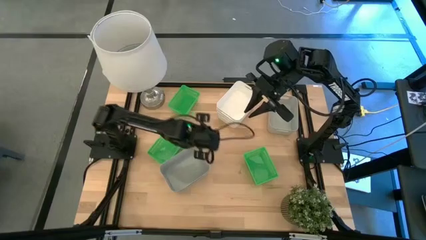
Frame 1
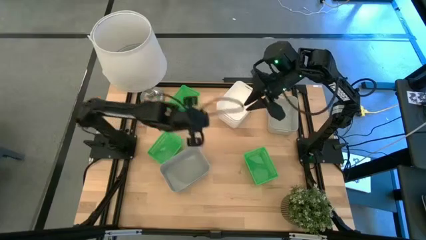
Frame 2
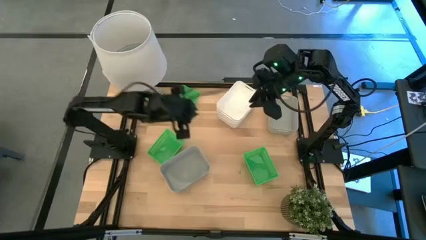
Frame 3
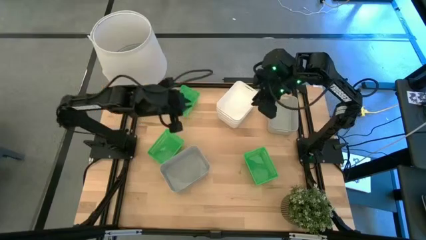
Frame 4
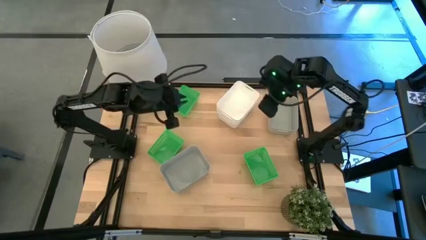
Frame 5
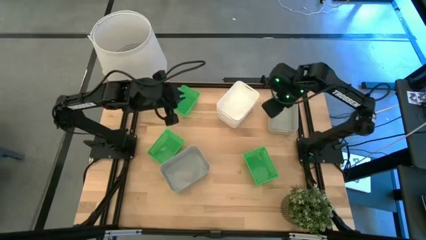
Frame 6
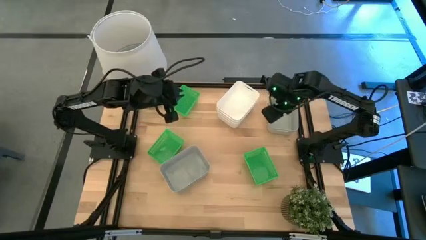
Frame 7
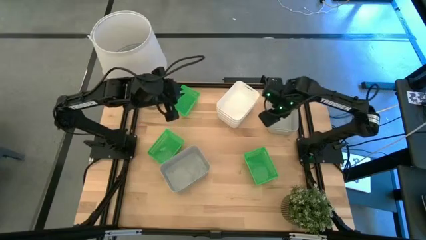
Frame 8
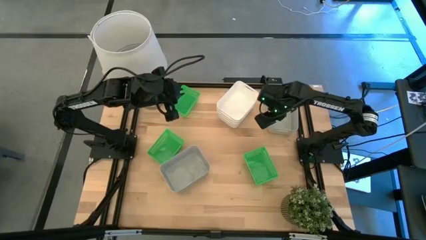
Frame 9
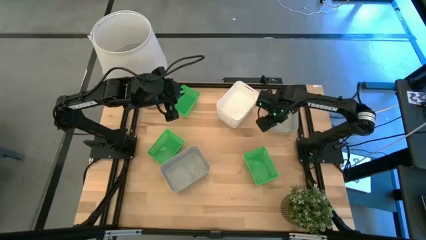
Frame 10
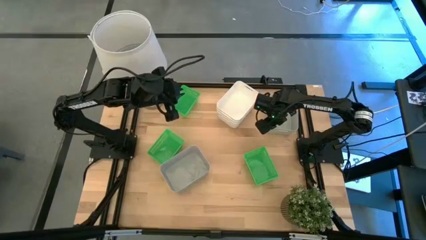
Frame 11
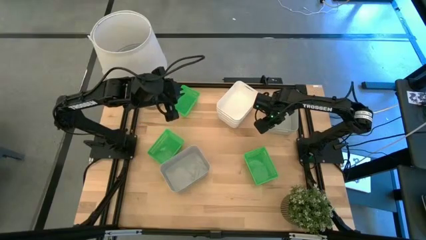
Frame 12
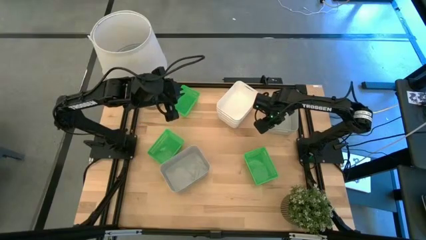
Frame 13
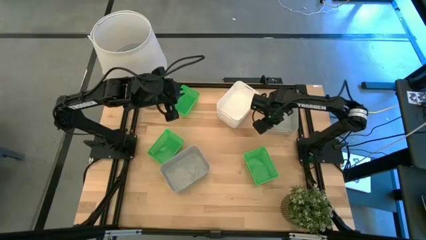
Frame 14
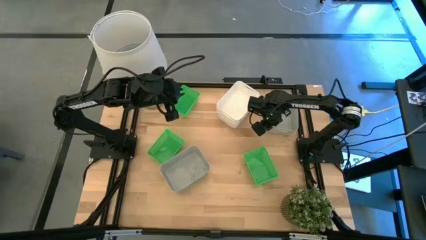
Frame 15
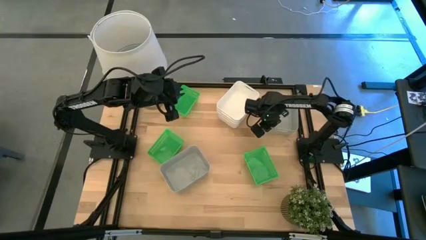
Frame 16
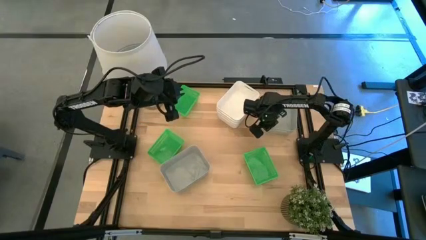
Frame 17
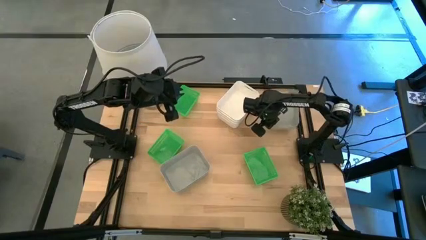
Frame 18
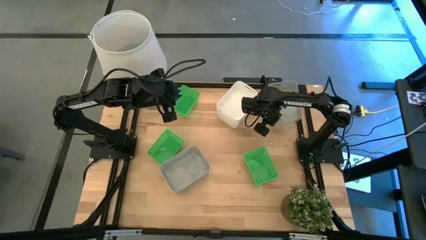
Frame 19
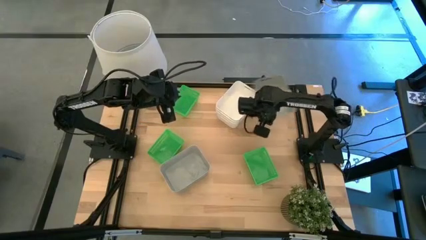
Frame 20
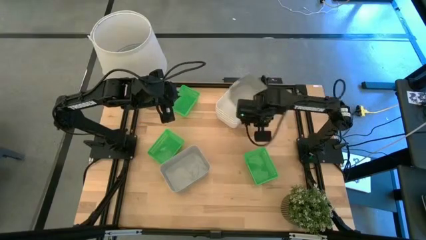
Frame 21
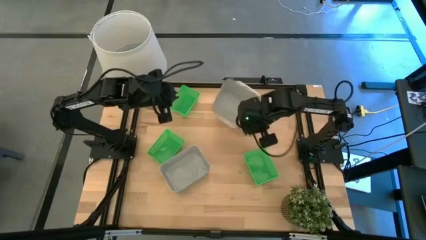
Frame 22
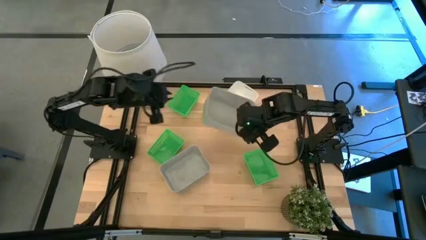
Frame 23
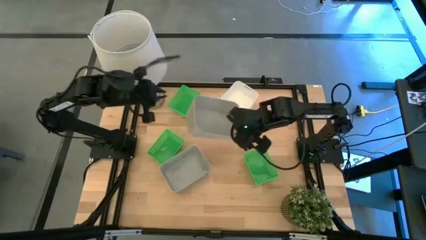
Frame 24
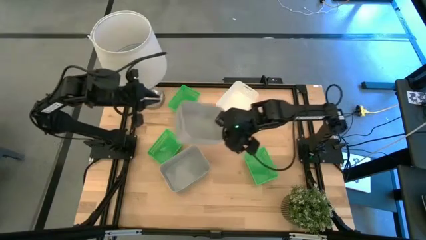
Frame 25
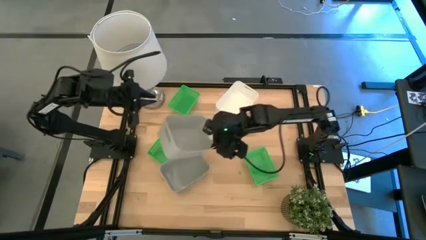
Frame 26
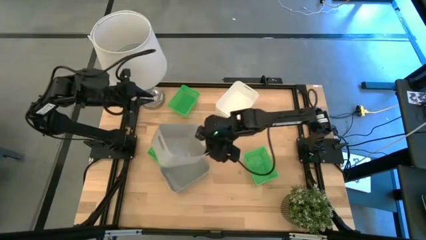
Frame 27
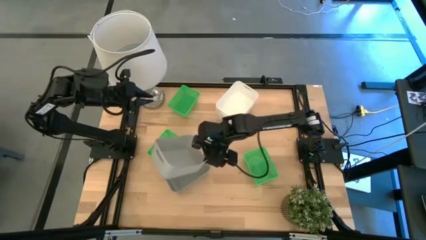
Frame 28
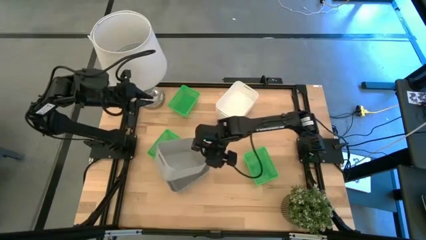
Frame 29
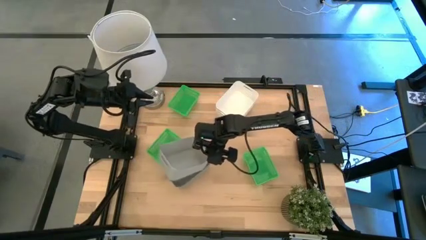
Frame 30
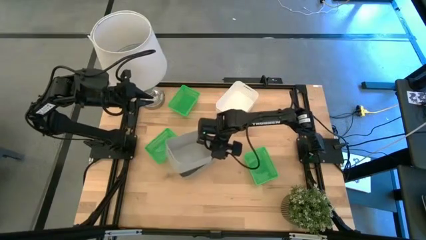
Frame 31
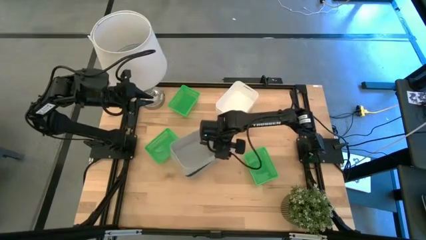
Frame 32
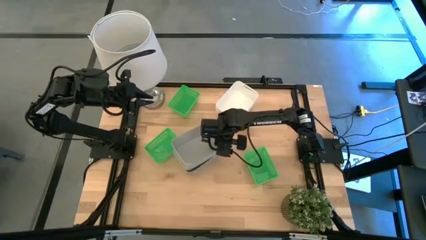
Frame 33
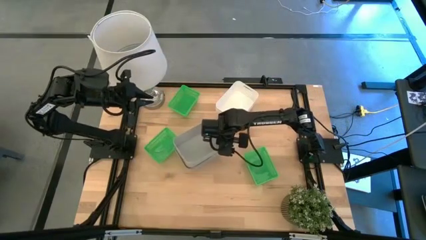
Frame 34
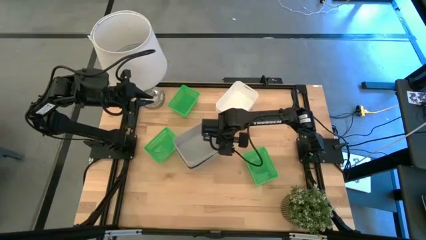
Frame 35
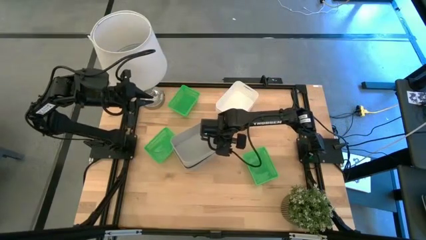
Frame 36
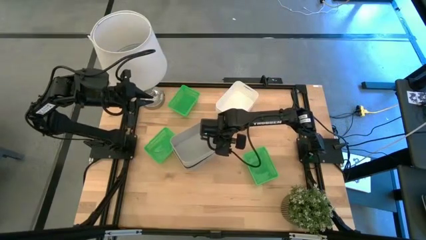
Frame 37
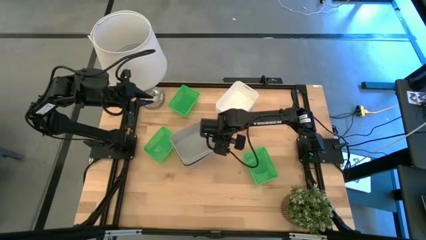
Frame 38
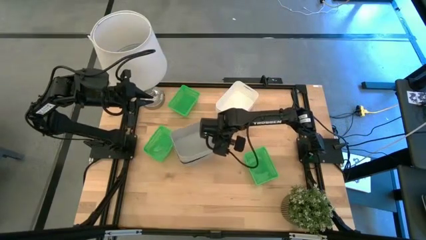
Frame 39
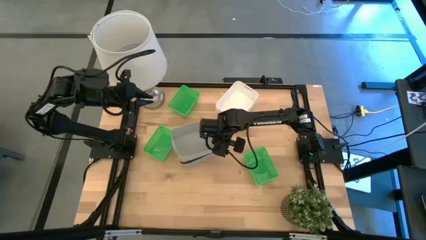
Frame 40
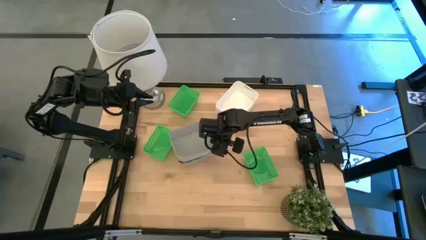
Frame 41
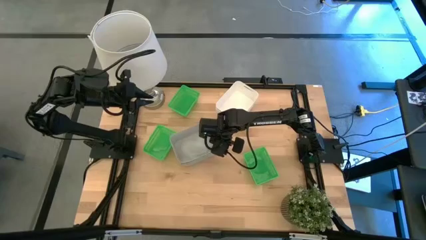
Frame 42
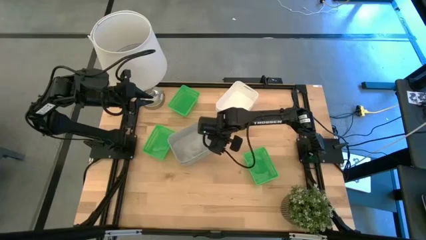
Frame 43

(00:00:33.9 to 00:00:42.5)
Stack the top gray bin on the gray bins
